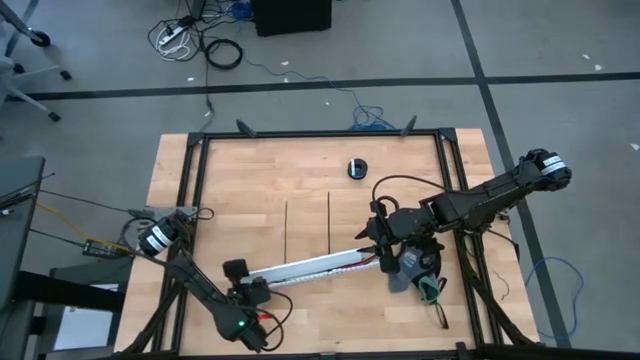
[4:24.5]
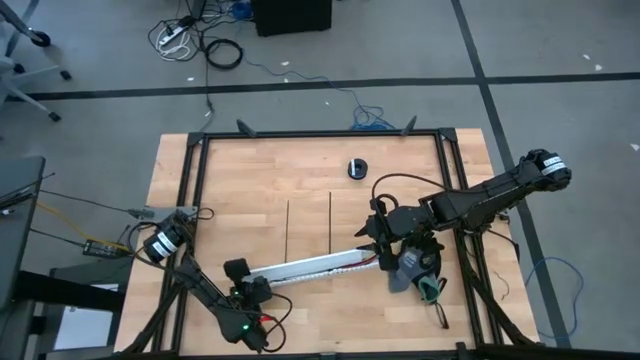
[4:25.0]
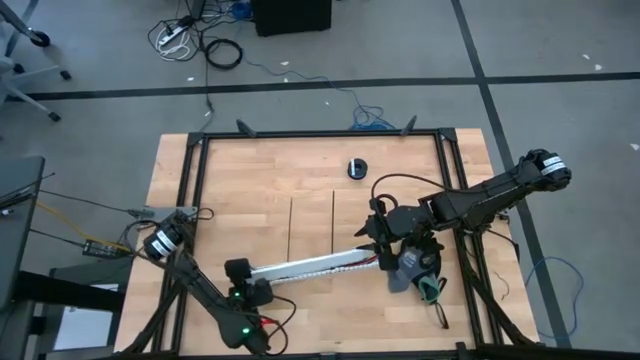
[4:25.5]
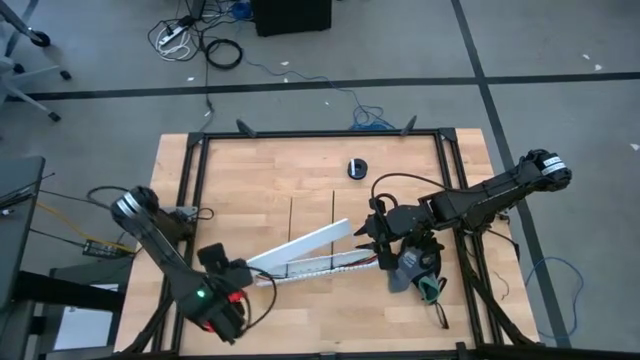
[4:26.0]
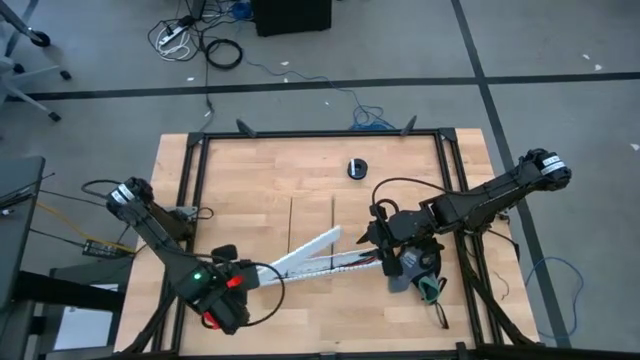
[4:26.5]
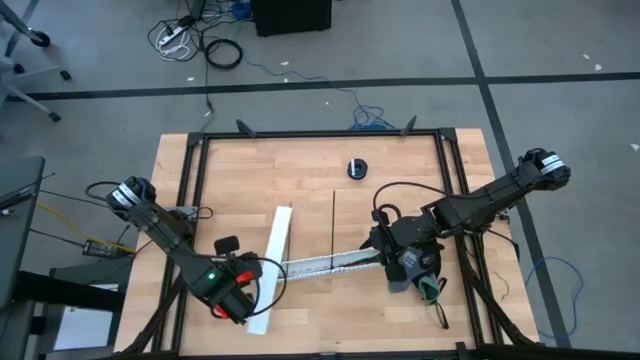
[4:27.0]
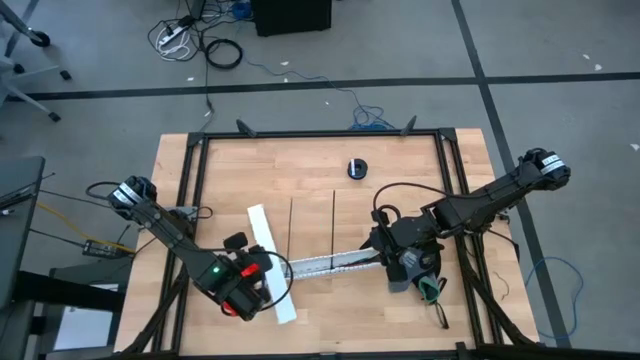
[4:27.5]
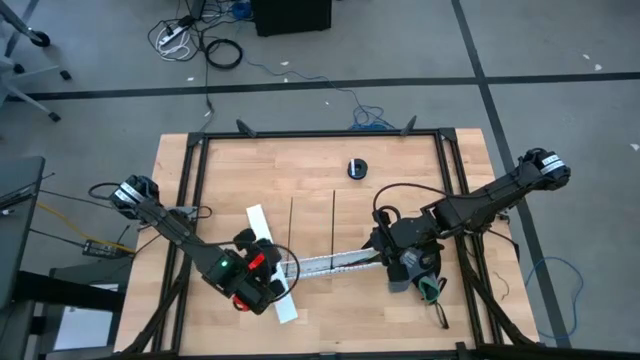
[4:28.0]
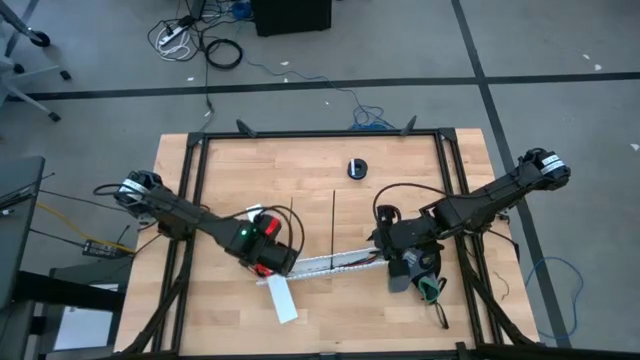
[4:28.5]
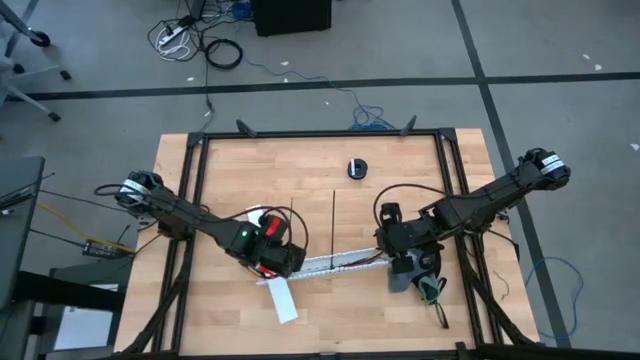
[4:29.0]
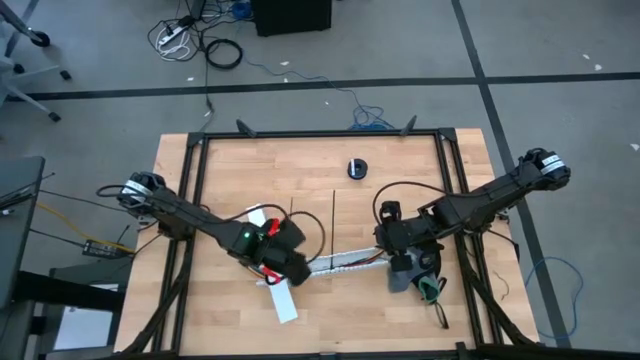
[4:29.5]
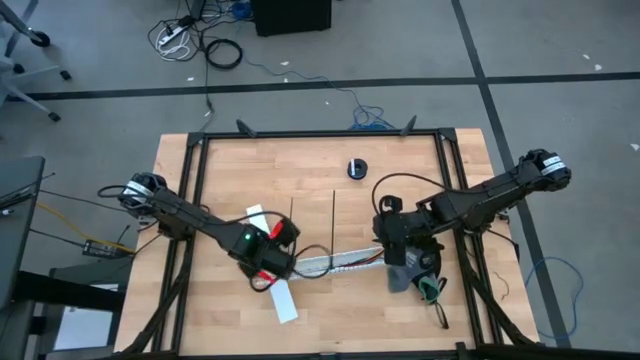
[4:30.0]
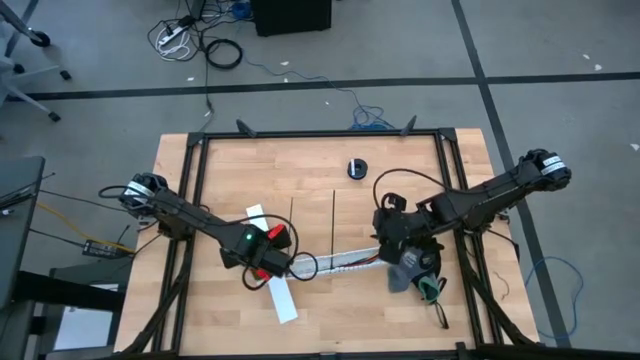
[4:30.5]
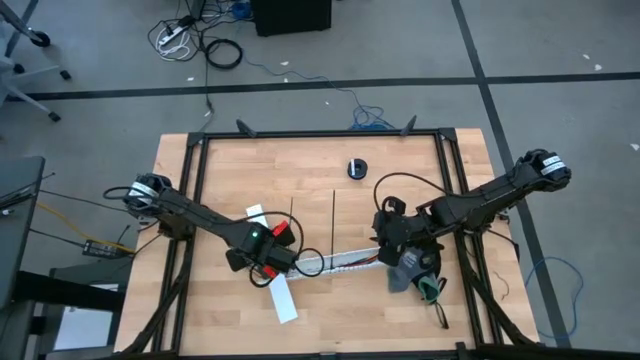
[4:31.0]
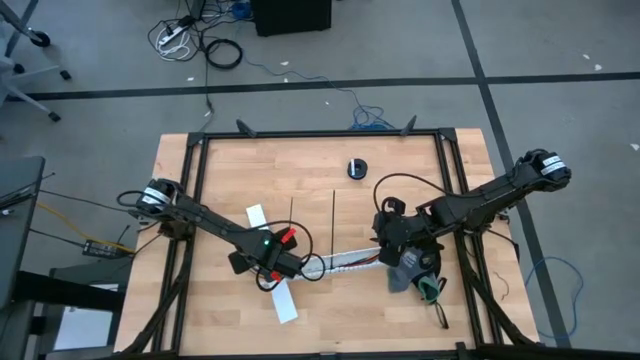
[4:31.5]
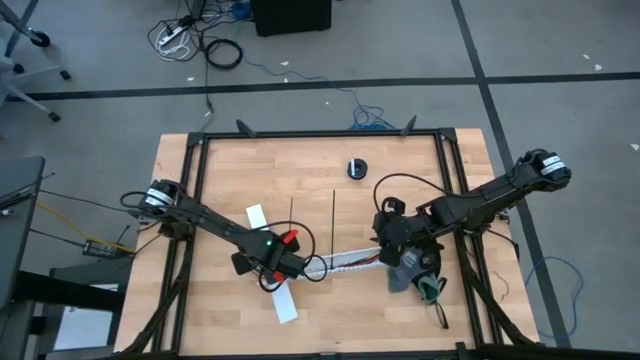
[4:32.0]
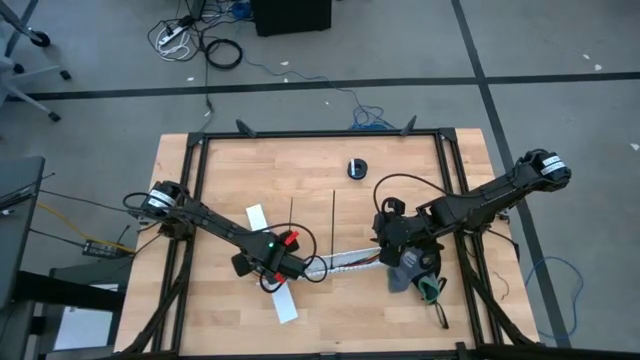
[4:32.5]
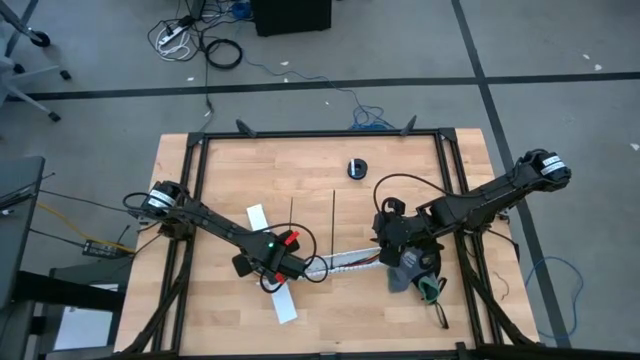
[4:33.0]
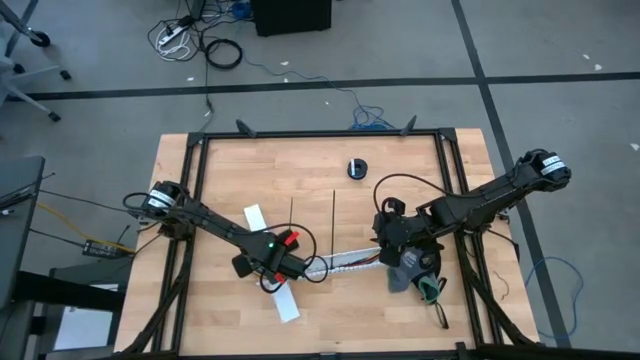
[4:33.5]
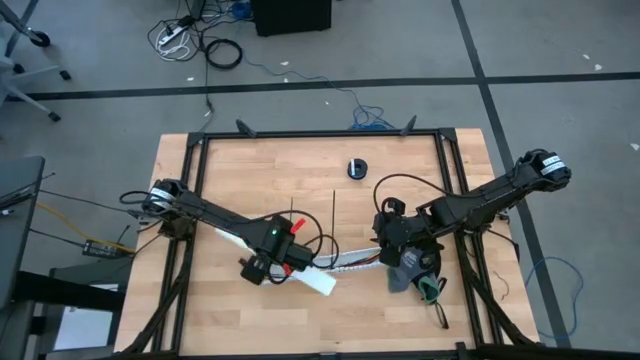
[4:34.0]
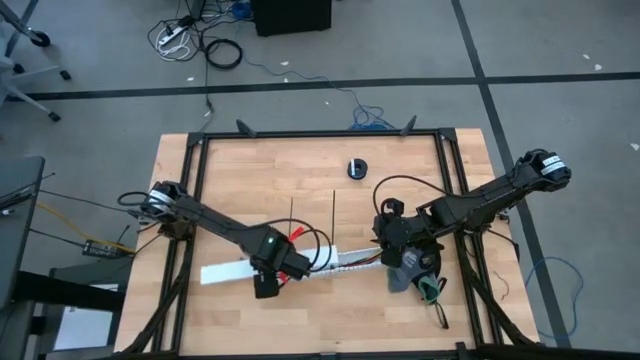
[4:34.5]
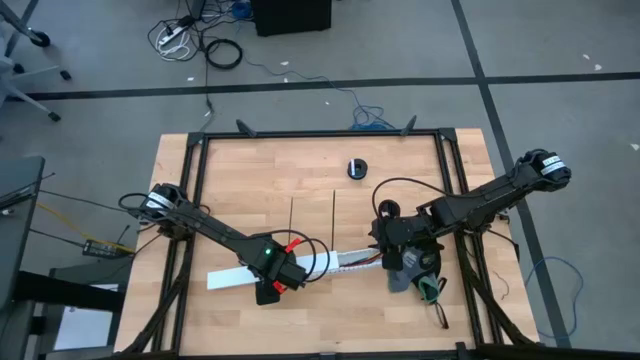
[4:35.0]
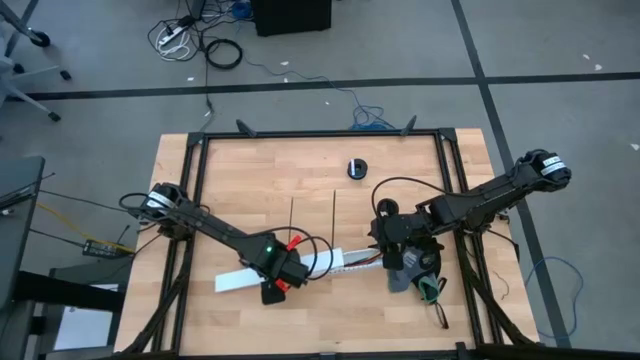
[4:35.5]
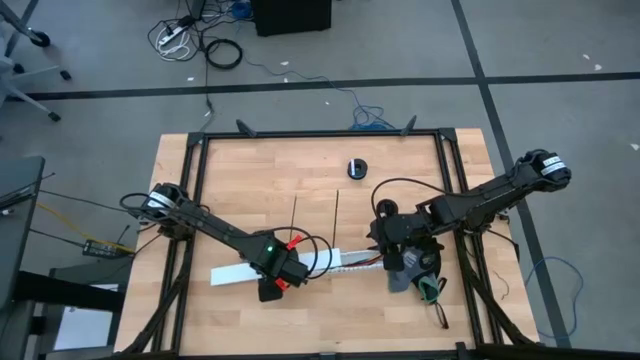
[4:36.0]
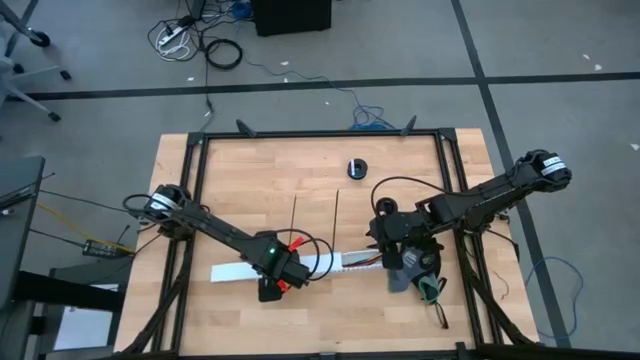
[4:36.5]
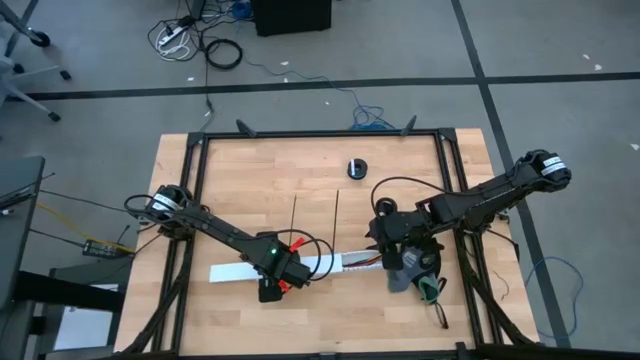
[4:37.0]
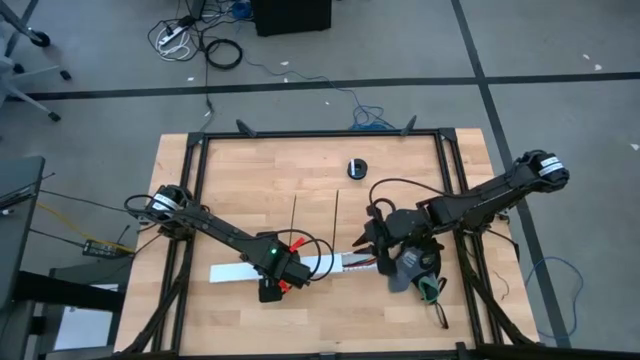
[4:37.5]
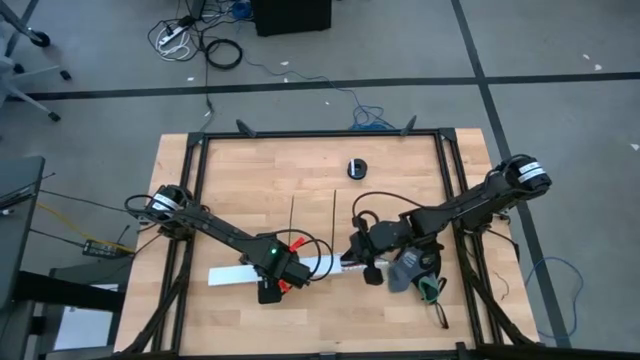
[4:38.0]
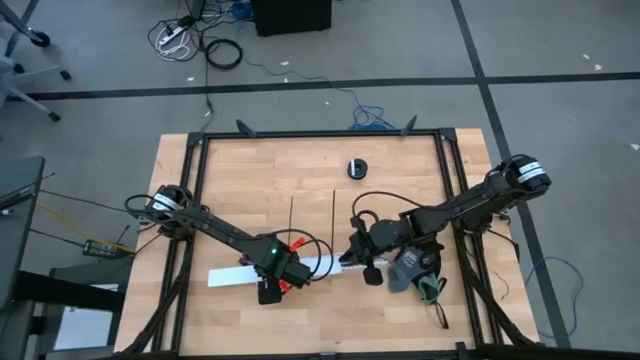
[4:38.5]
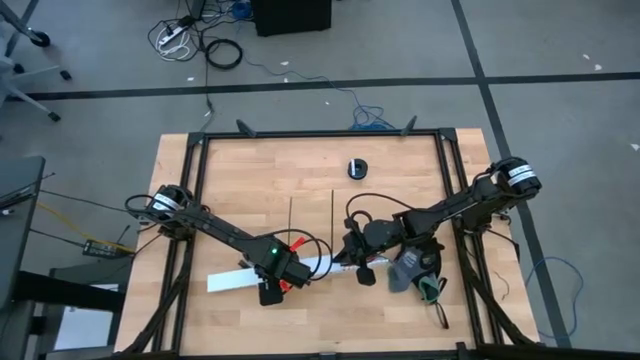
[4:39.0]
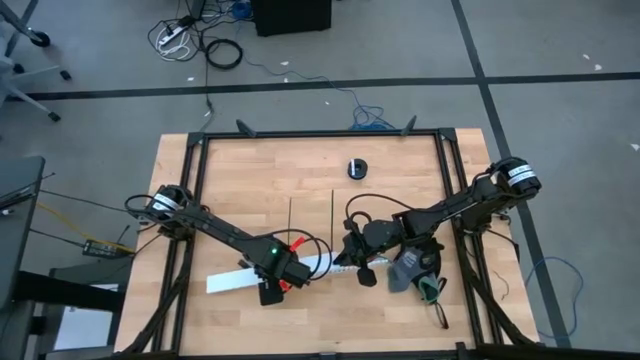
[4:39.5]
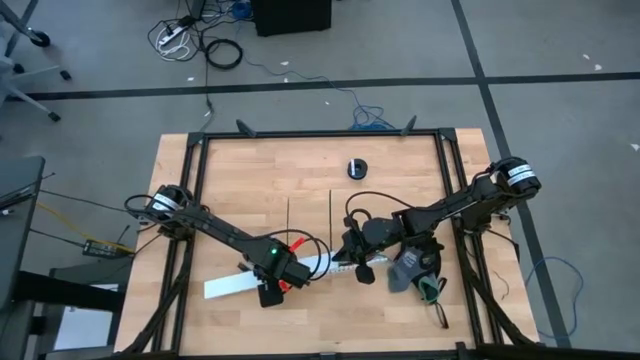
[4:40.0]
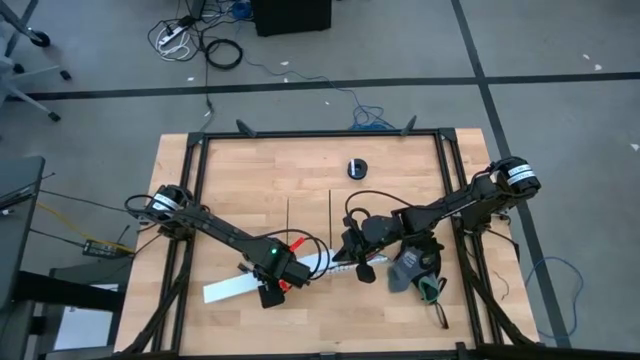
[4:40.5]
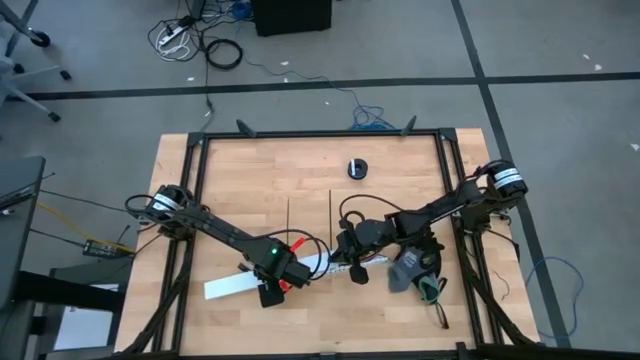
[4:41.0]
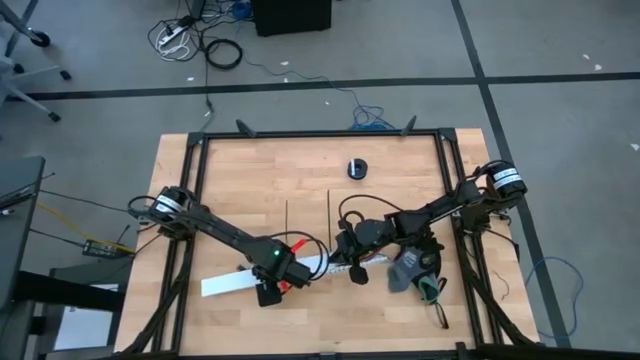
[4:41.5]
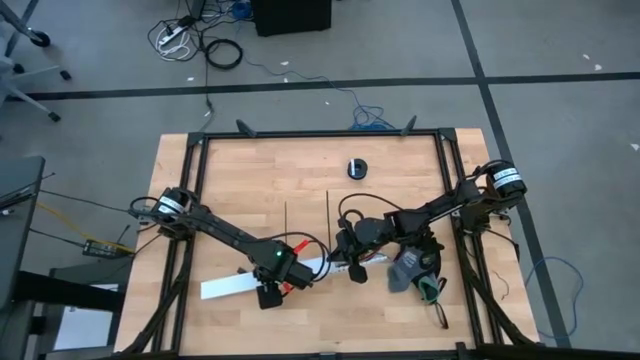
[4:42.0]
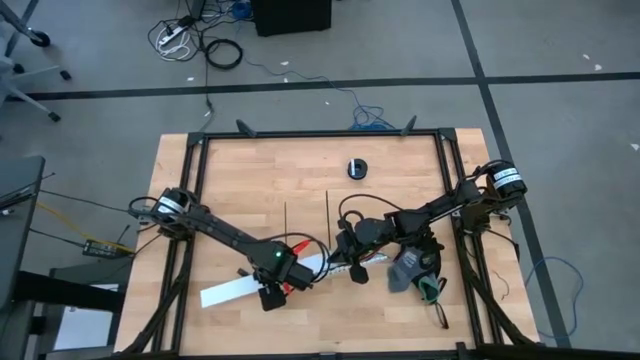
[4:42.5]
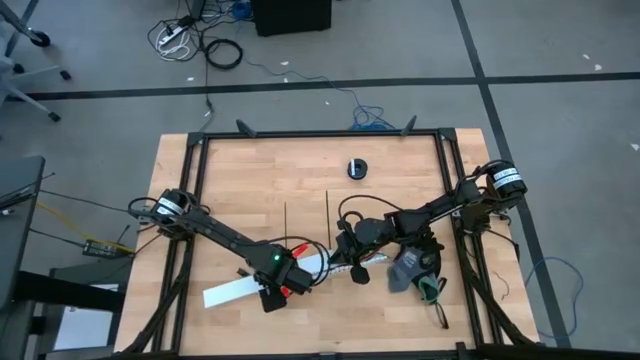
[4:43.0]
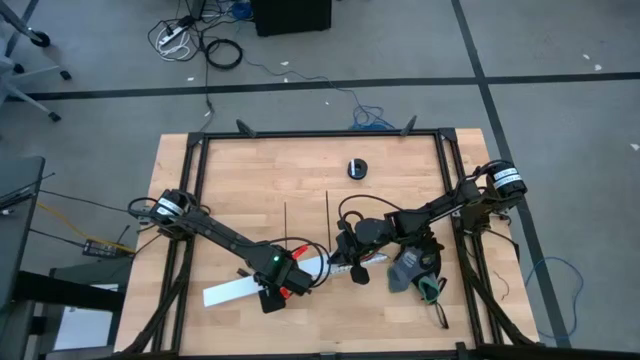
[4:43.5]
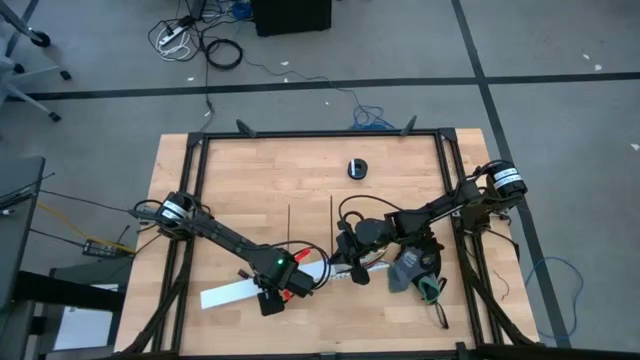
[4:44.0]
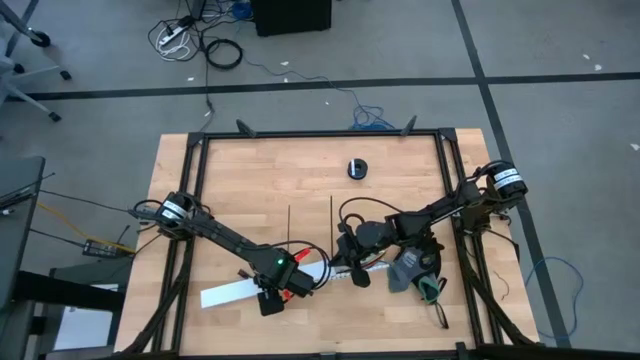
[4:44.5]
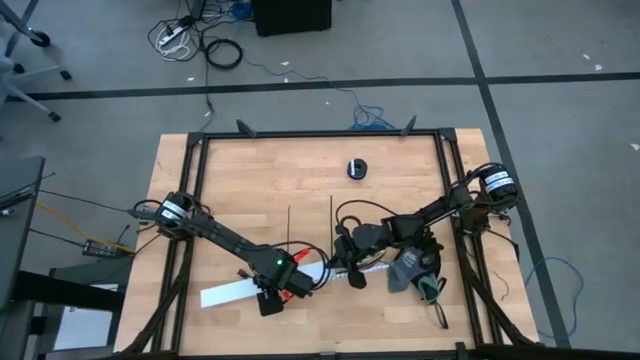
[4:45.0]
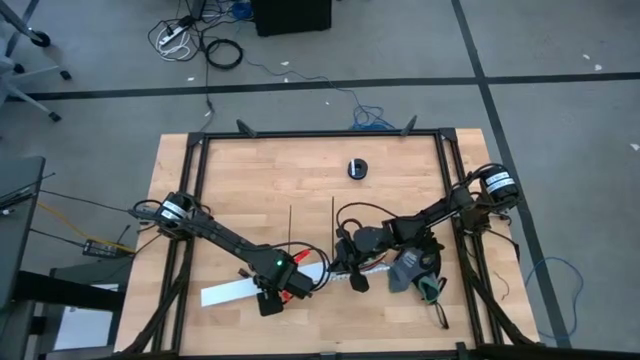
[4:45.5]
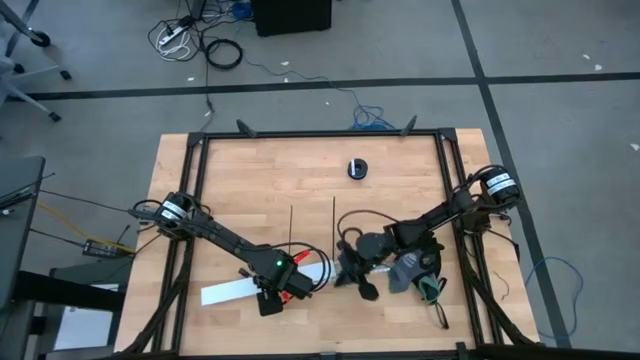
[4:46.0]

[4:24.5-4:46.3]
Task: Ziptie cables
Close the white cable duct
